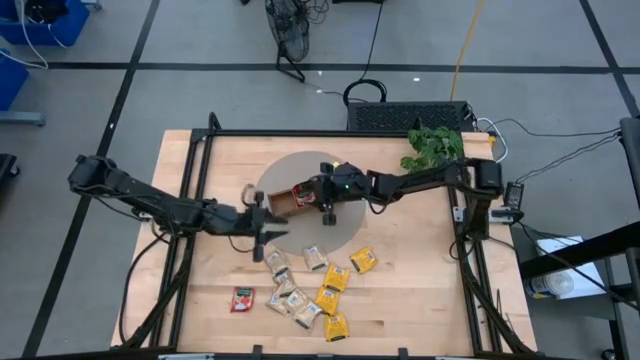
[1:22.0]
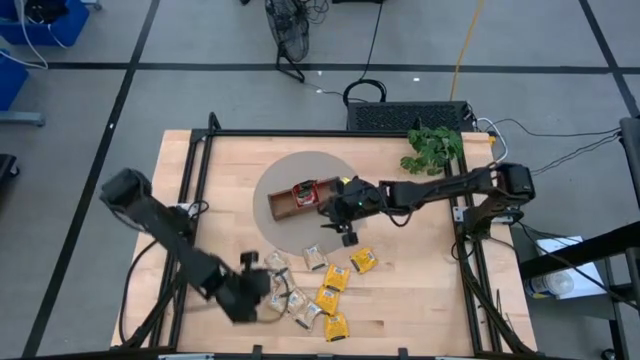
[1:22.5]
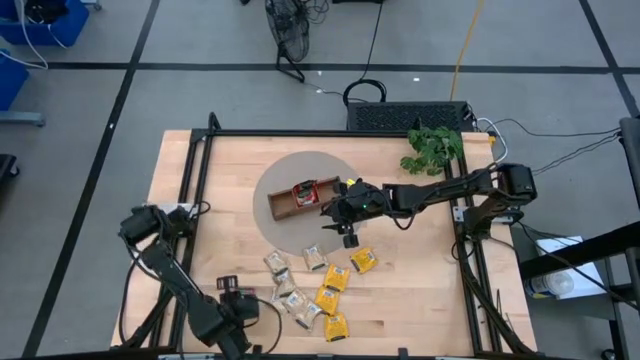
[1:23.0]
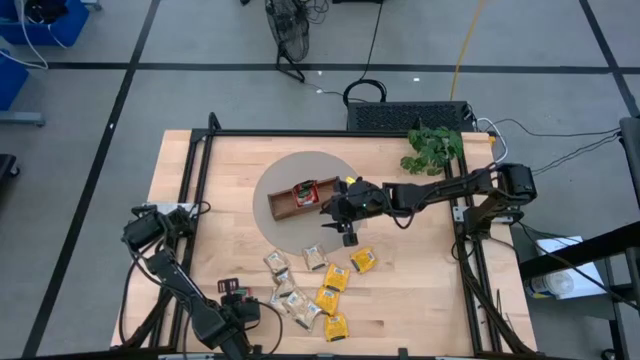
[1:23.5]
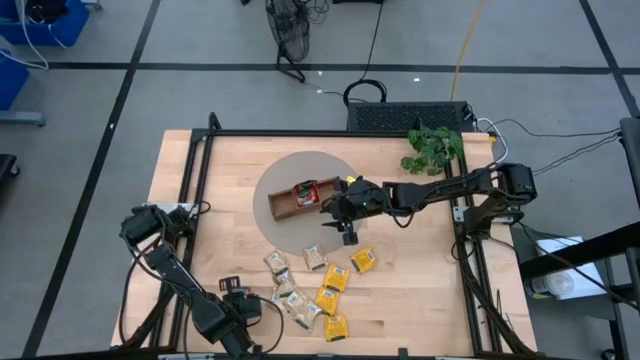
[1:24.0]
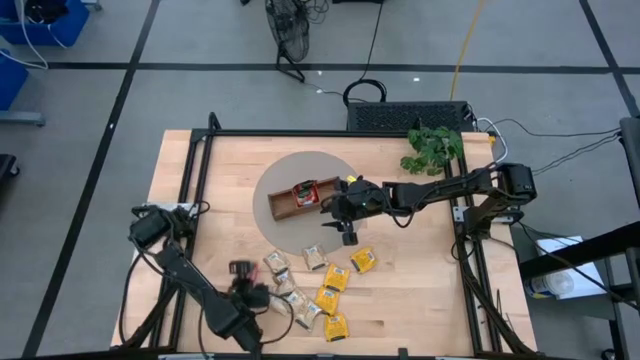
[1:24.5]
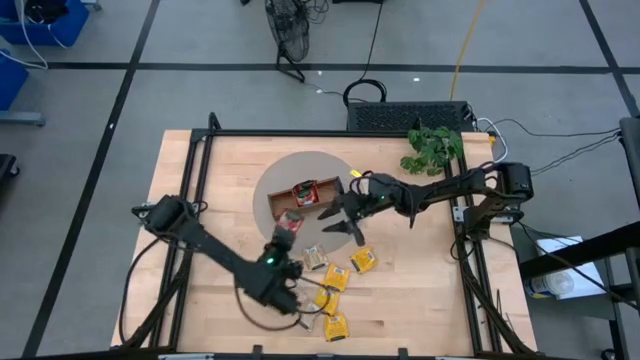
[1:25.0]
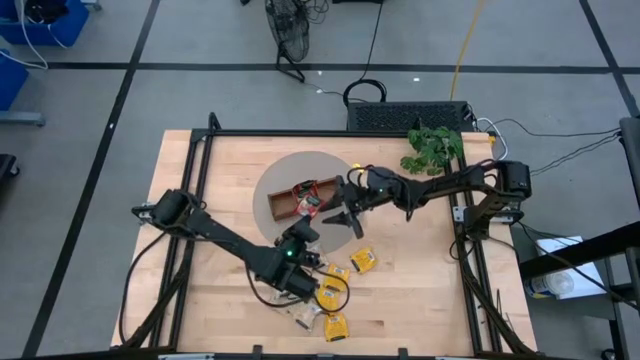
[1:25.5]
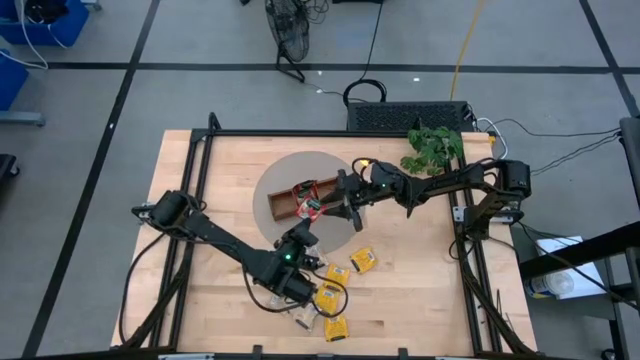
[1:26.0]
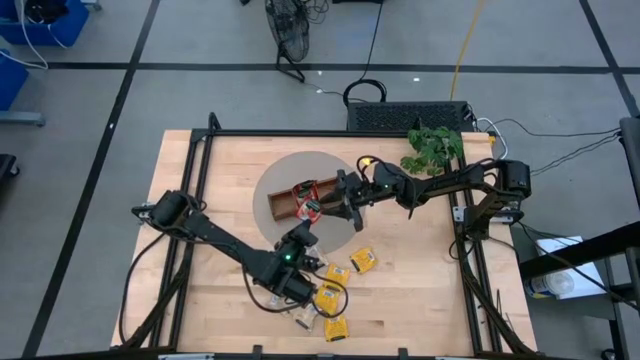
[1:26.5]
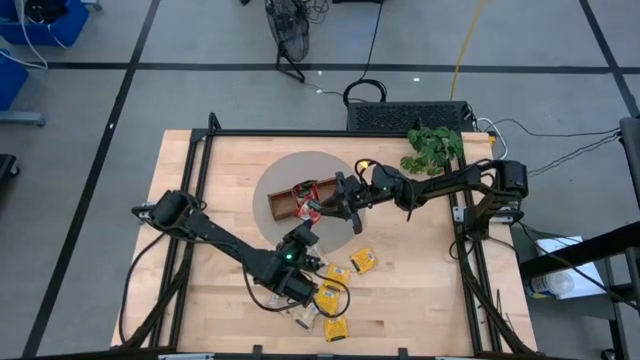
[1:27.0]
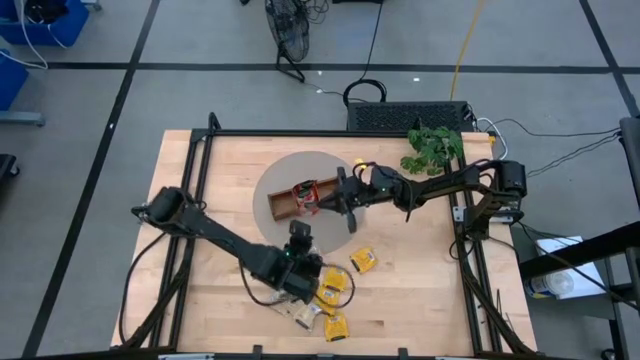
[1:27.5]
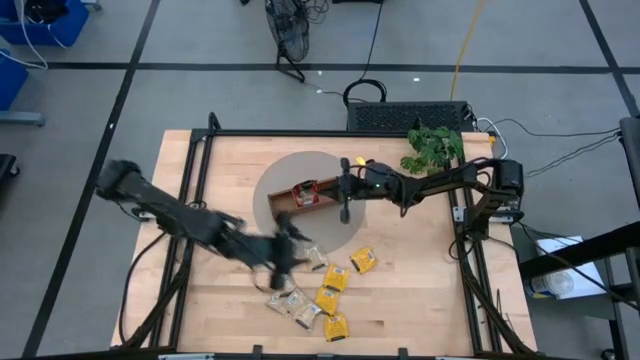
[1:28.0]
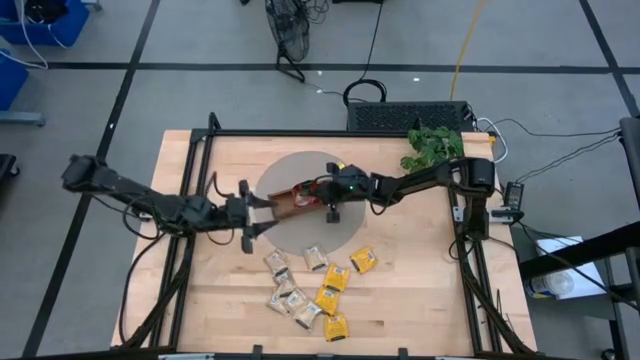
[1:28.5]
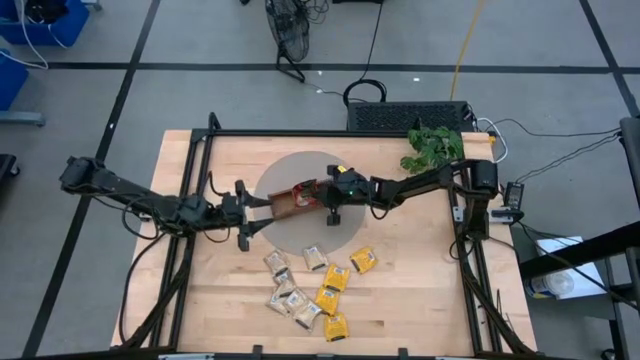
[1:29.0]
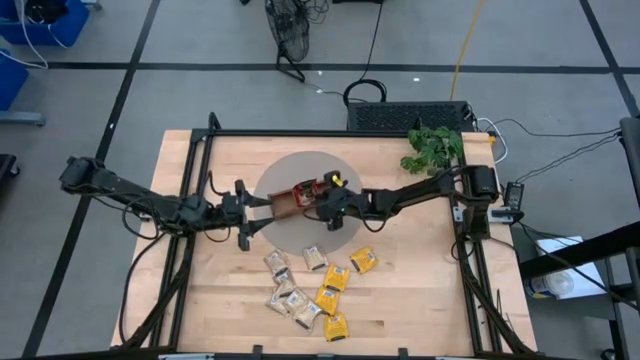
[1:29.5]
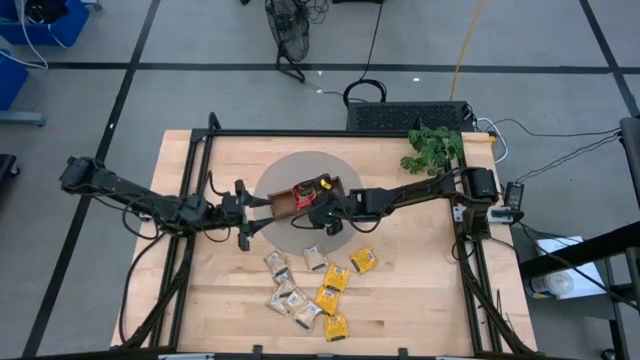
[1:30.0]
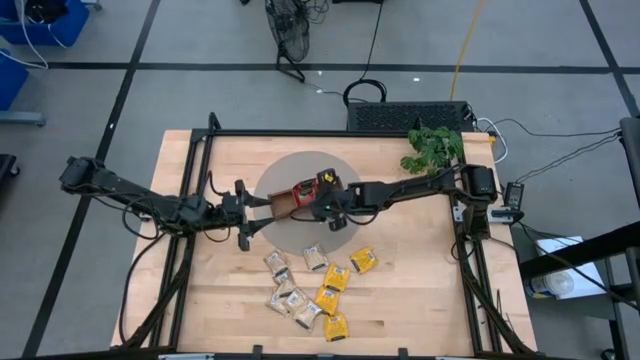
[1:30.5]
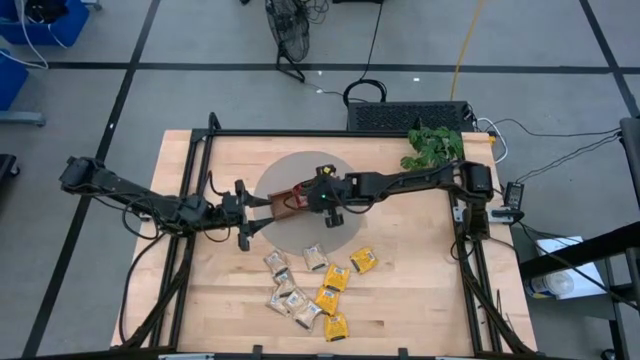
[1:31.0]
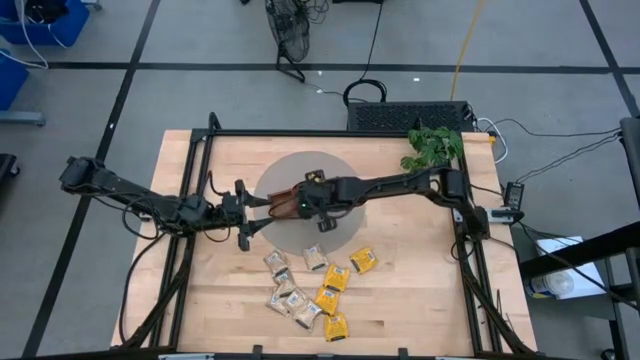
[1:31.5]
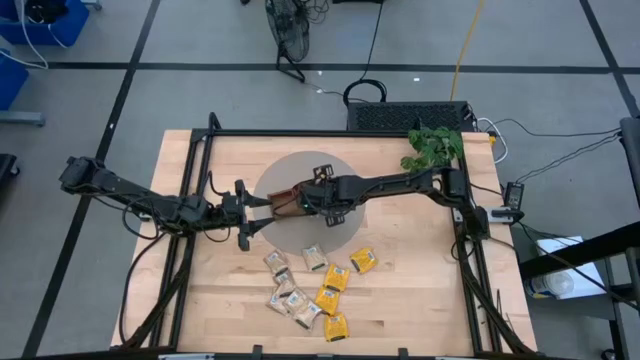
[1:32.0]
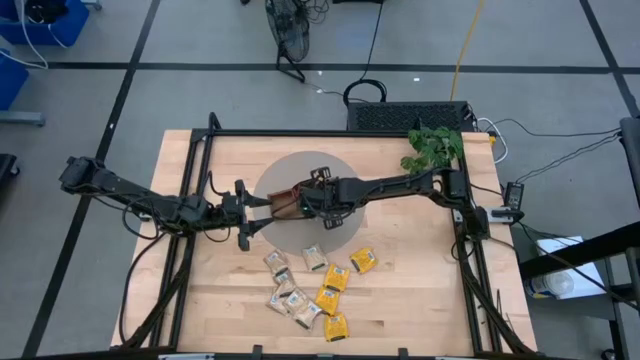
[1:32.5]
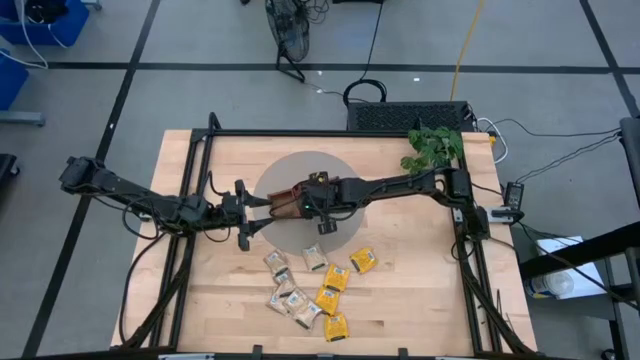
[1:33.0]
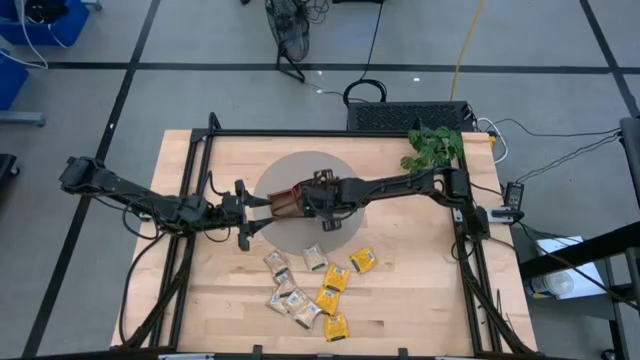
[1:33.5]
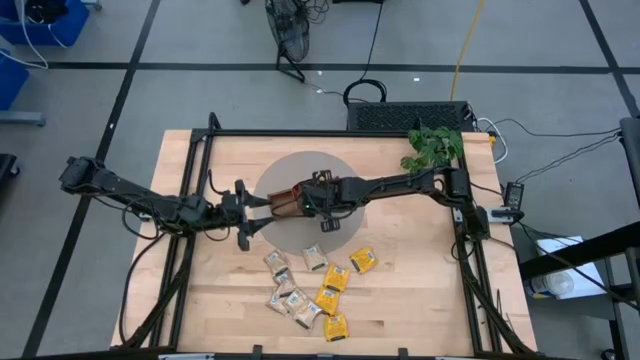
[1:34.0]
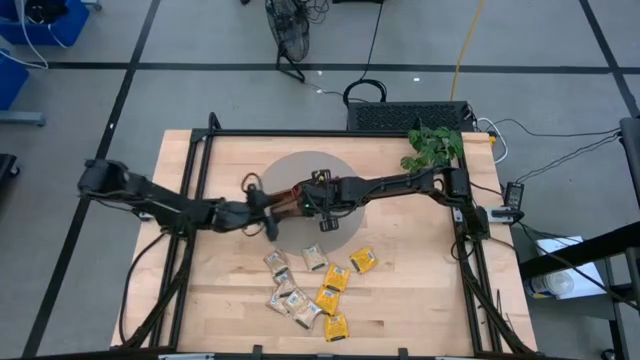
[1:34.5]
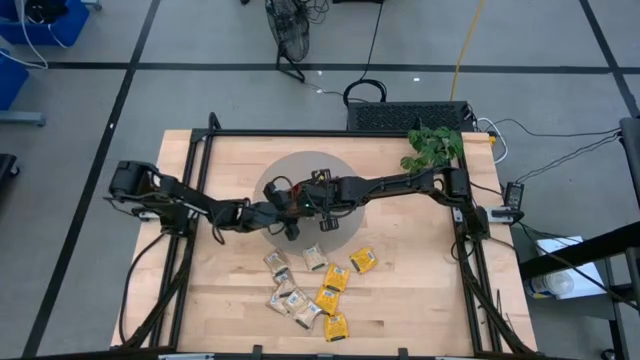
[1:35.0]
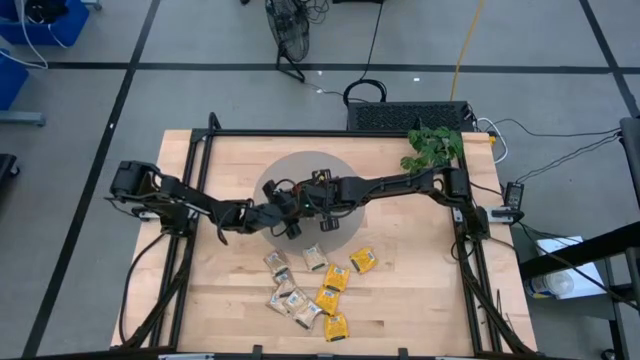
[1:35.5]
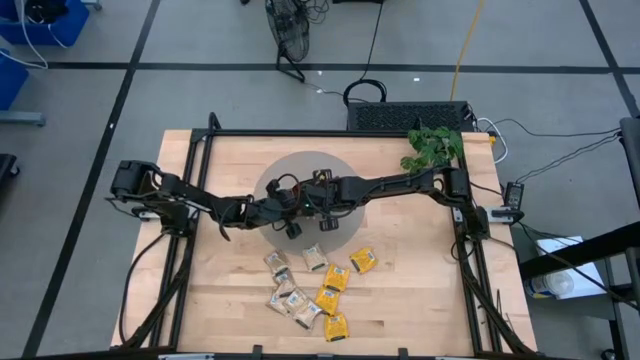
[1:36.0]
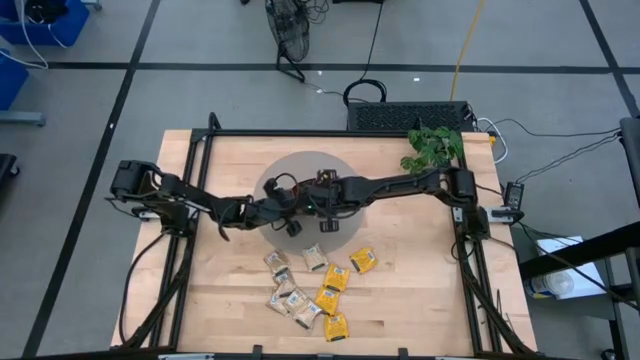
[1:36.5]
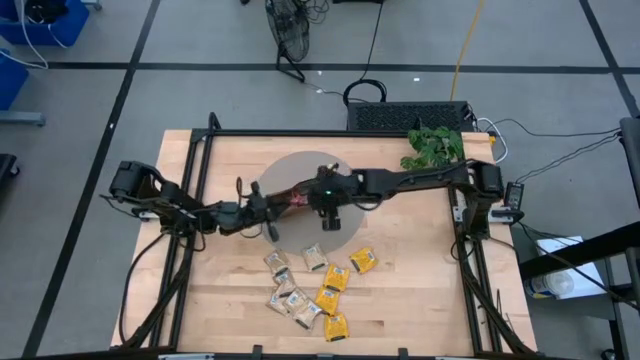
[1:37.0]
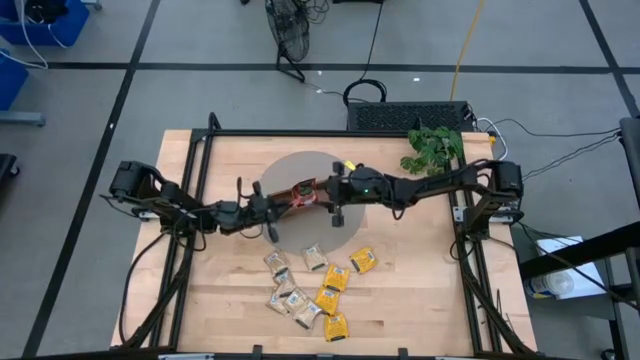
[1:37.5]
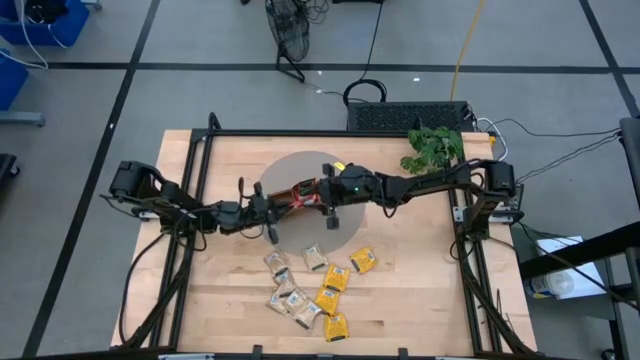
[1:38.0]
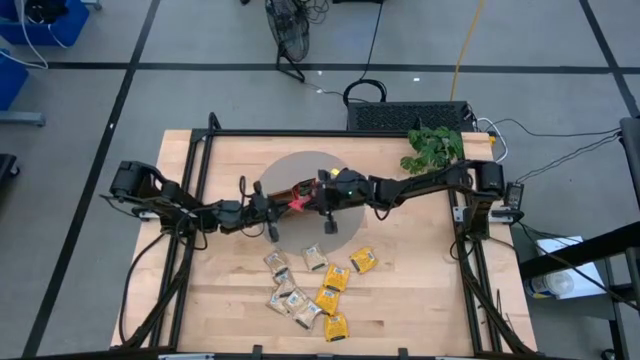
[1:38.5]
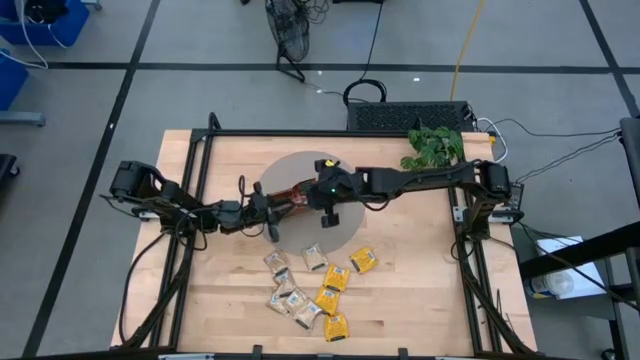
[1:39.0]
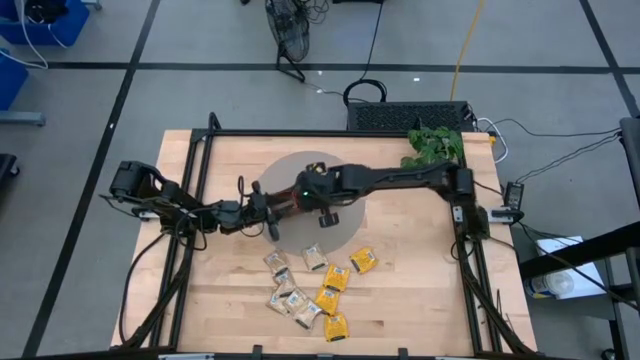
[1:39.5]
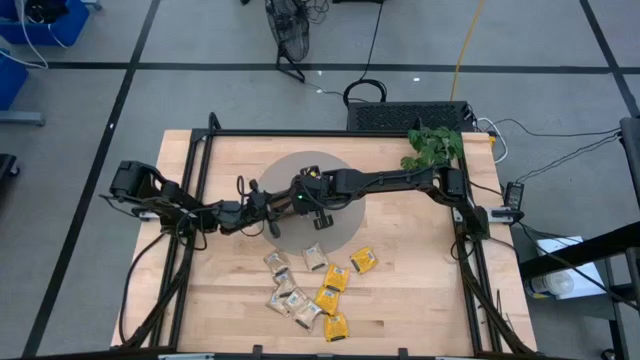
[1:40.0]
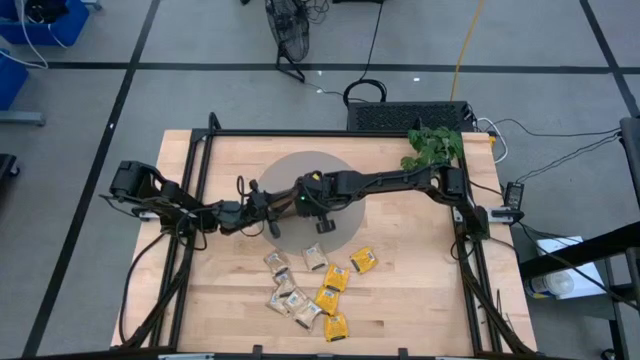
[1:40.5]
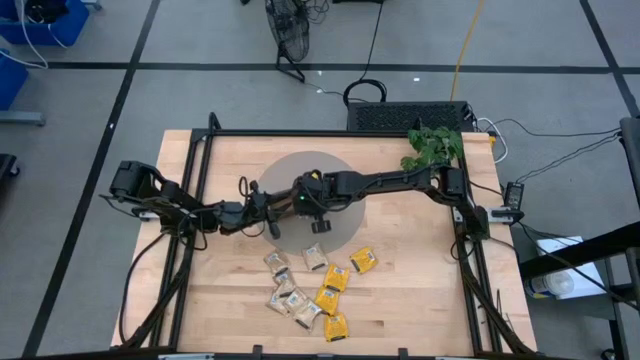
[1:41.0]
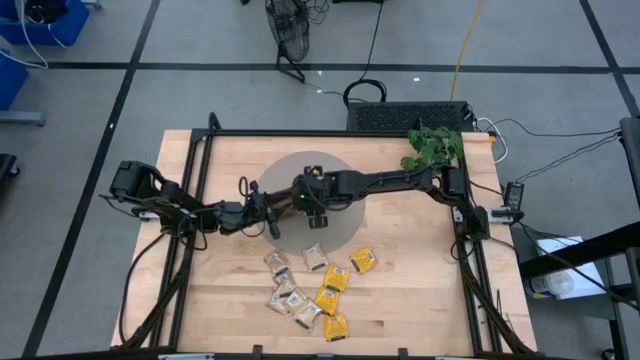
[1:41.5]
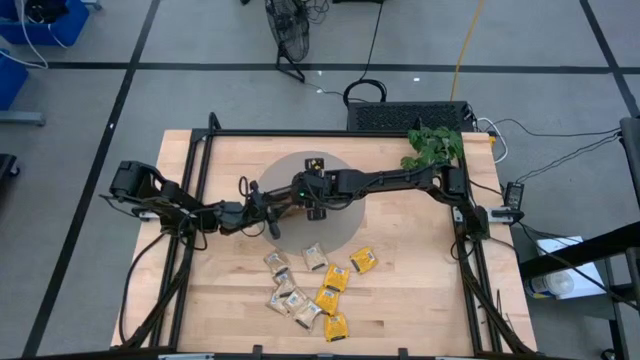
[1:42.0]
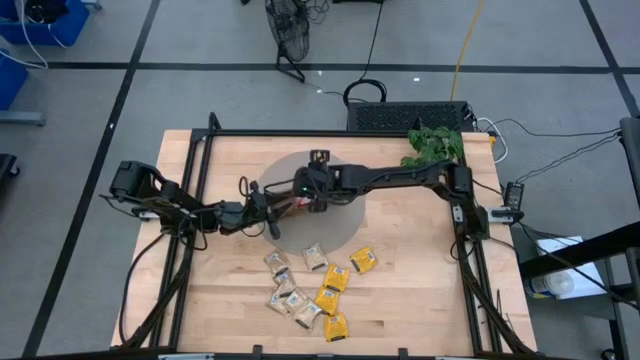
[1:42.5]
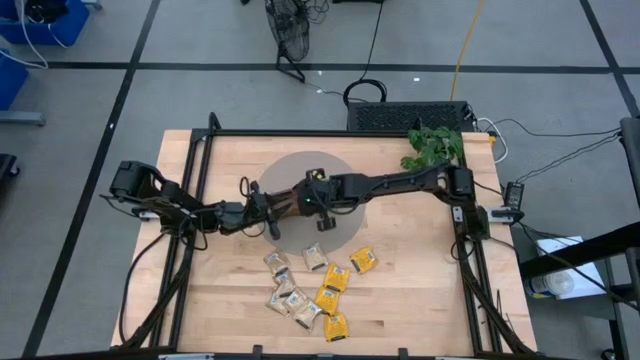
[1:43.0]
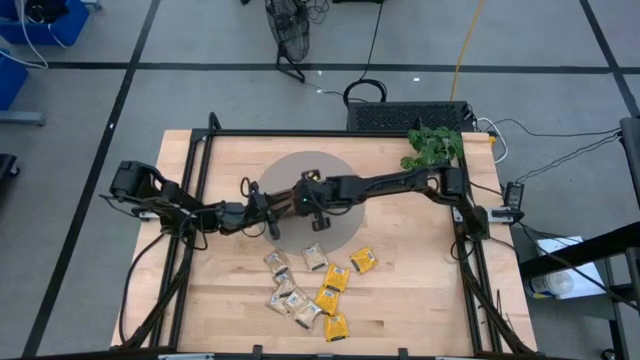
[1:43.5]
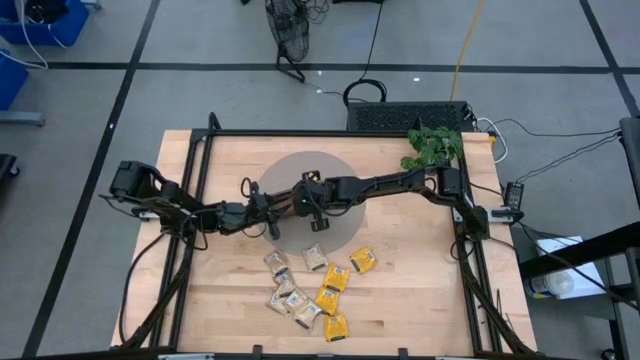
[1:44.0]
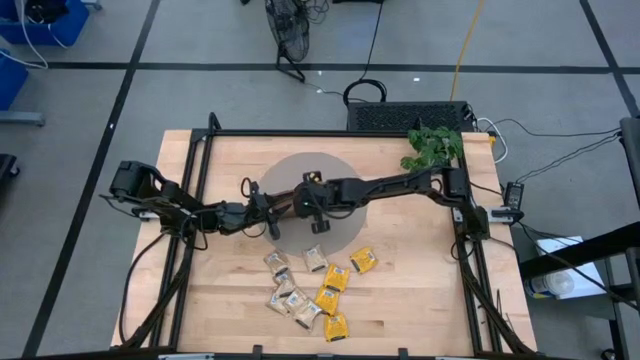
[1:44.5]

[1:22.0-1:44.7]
Task: Pick & Place Tea
Put the red tea bag into the wooden organizer

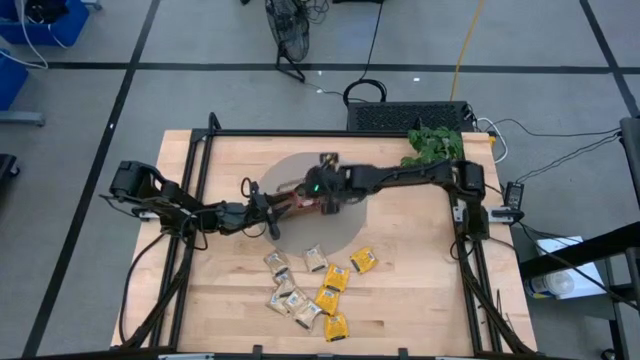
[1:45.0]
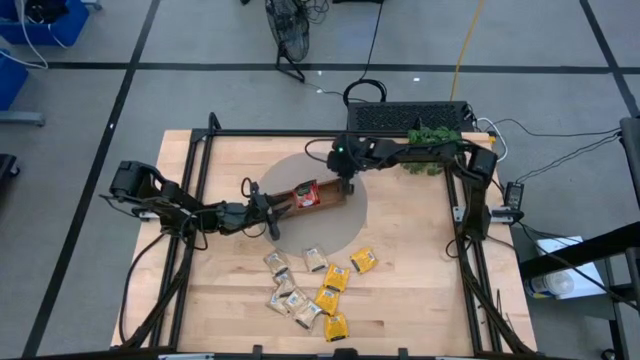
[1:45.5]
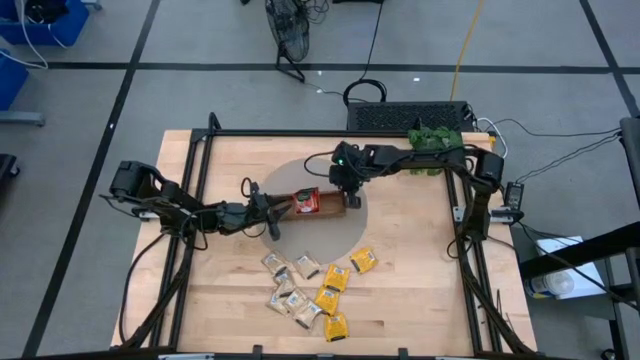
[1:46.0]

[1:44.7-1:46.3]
Adjust the wooden organizer
